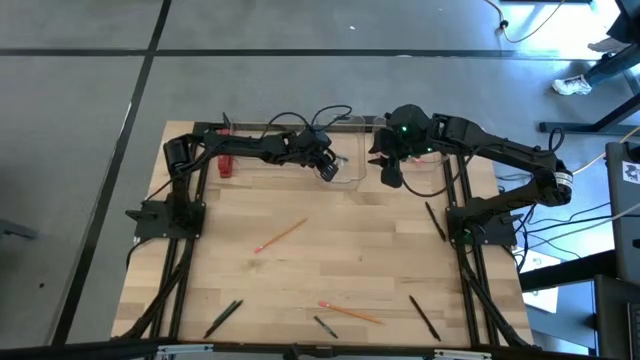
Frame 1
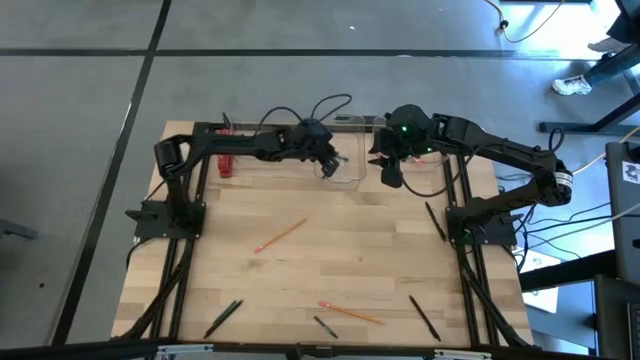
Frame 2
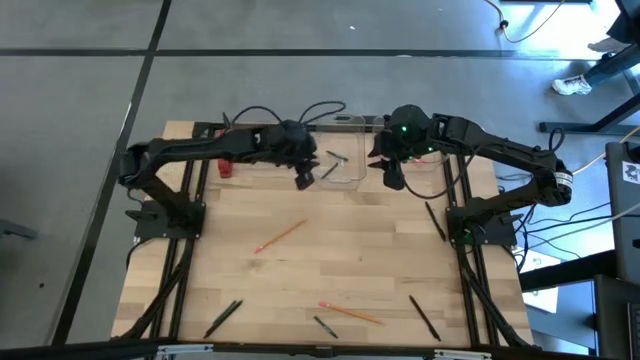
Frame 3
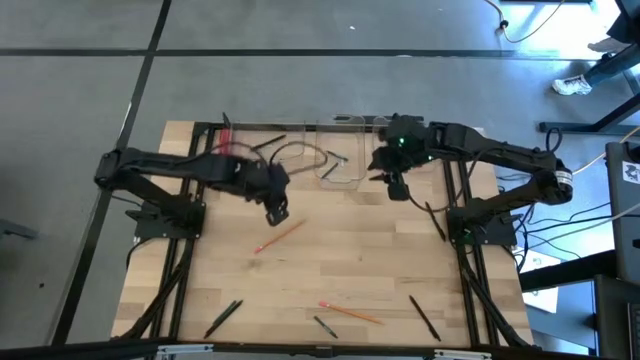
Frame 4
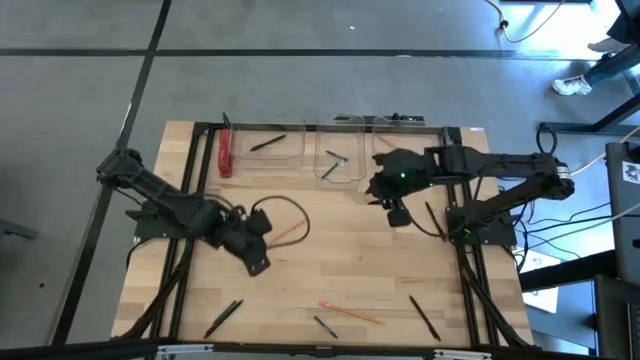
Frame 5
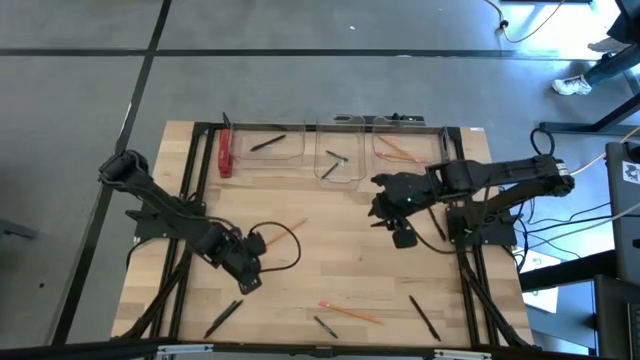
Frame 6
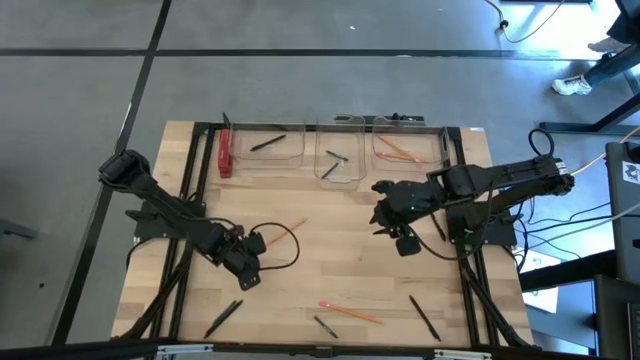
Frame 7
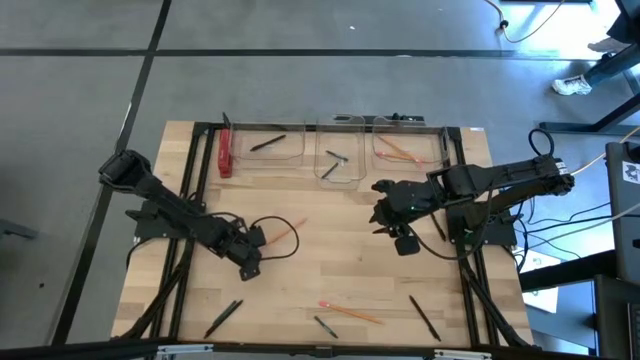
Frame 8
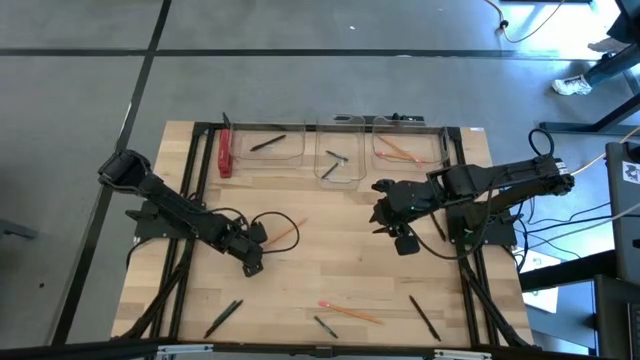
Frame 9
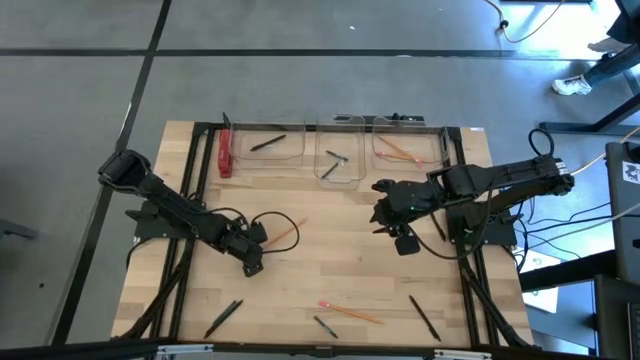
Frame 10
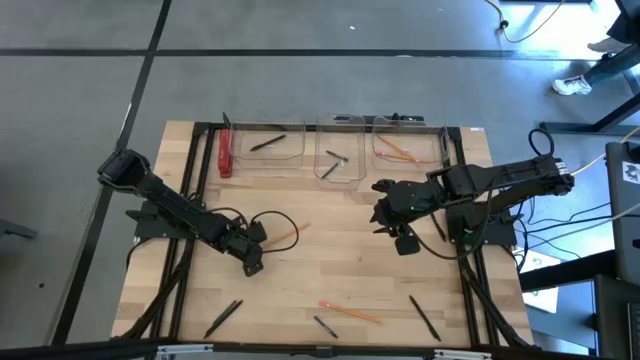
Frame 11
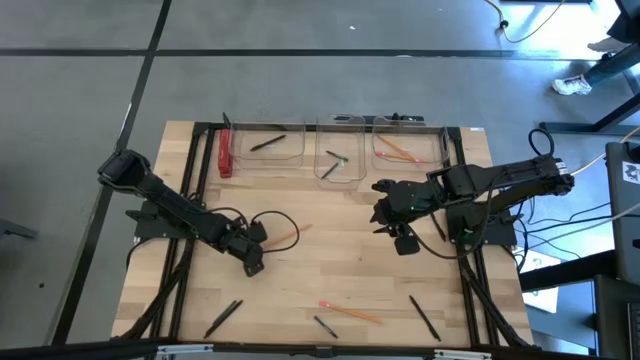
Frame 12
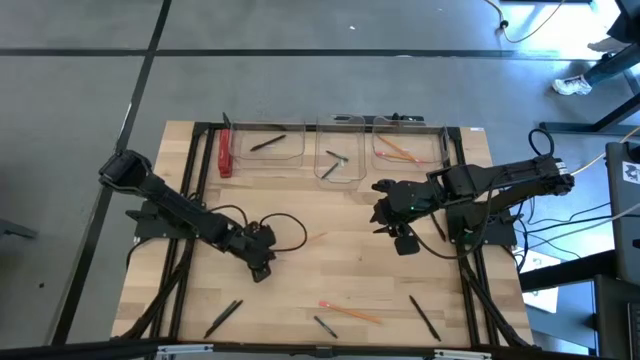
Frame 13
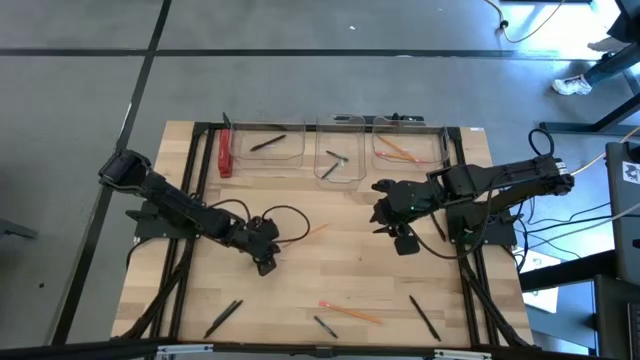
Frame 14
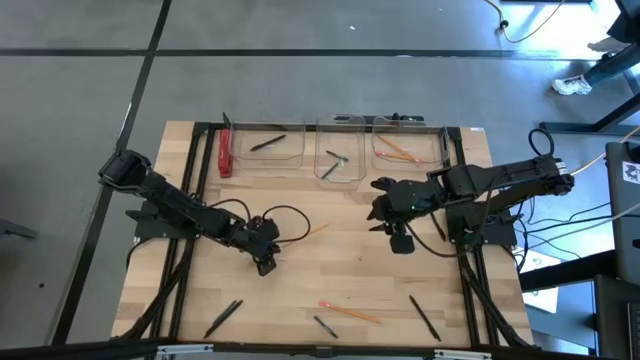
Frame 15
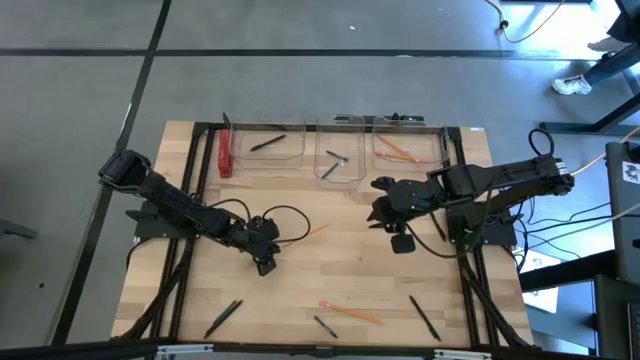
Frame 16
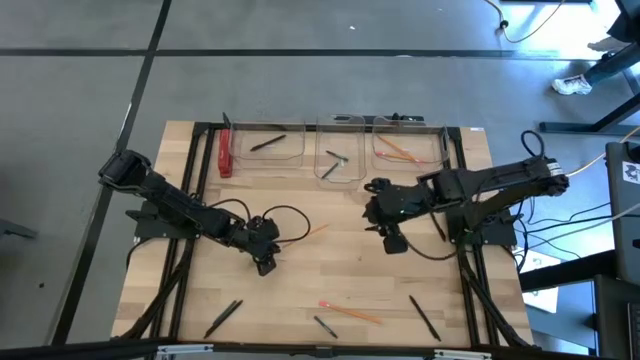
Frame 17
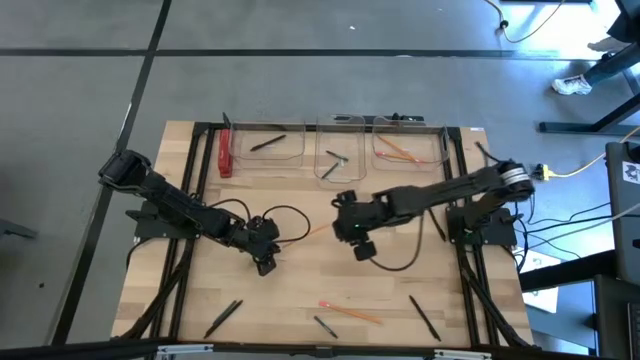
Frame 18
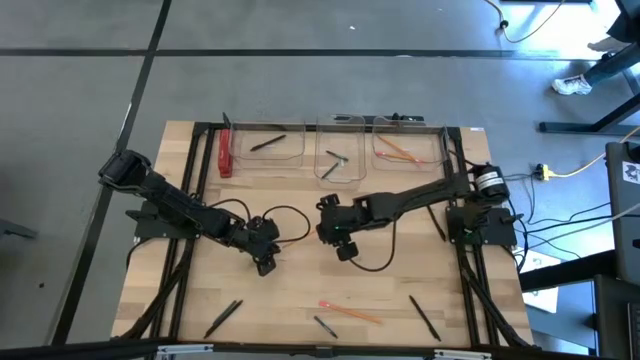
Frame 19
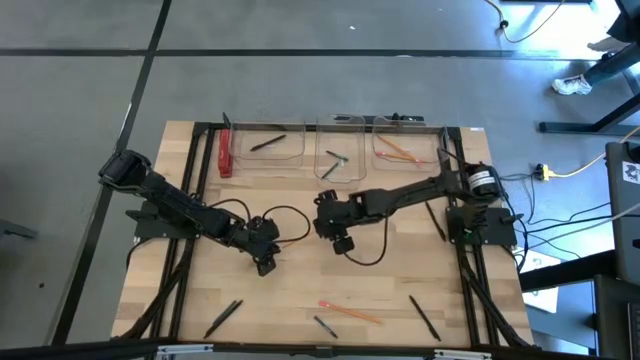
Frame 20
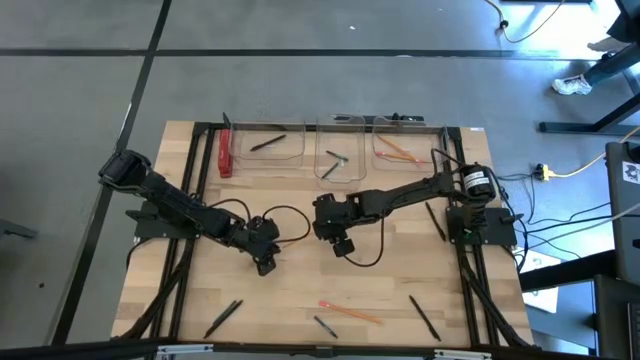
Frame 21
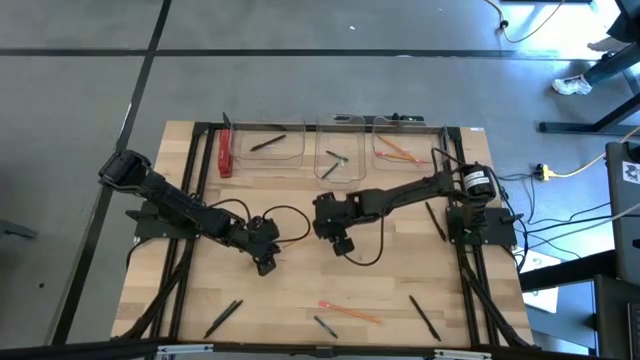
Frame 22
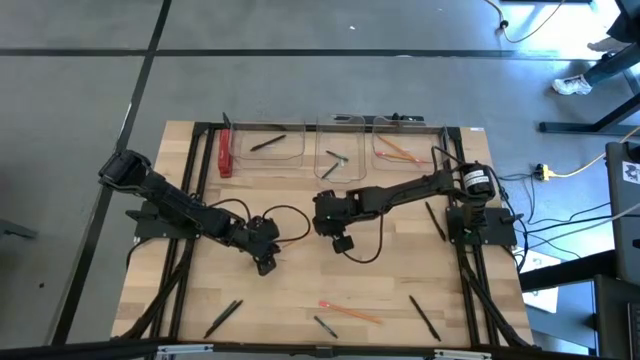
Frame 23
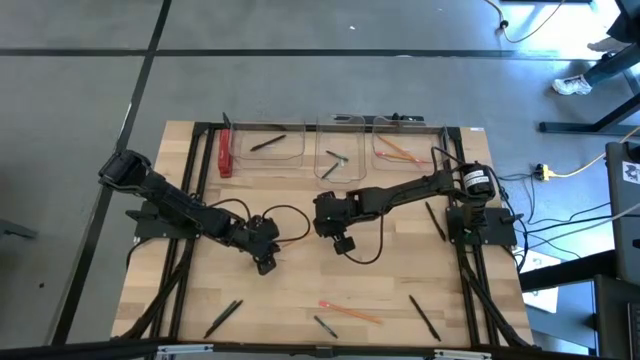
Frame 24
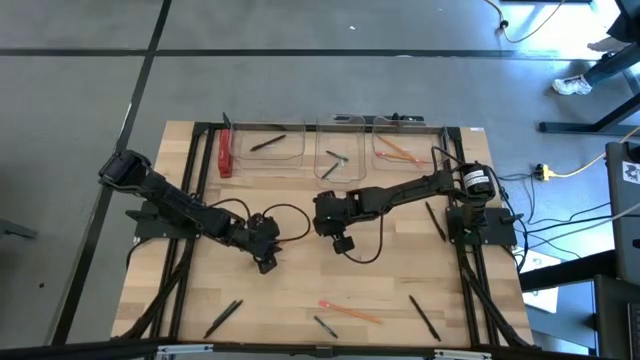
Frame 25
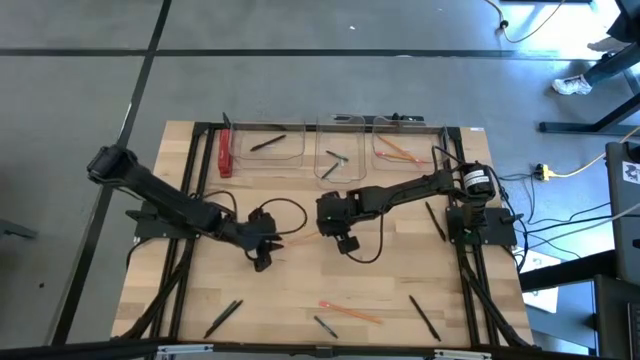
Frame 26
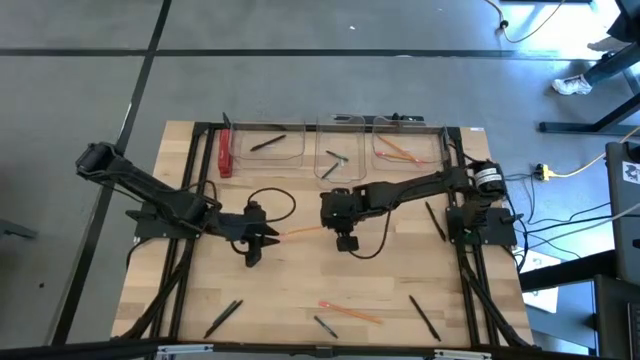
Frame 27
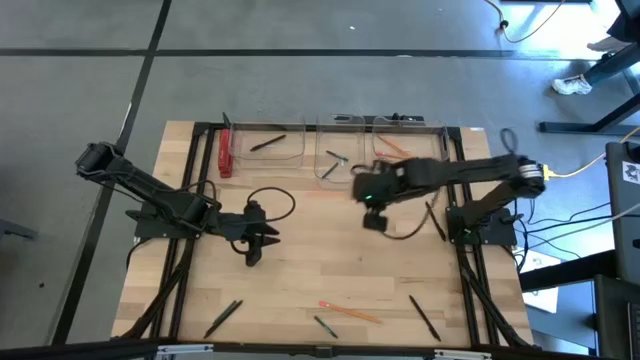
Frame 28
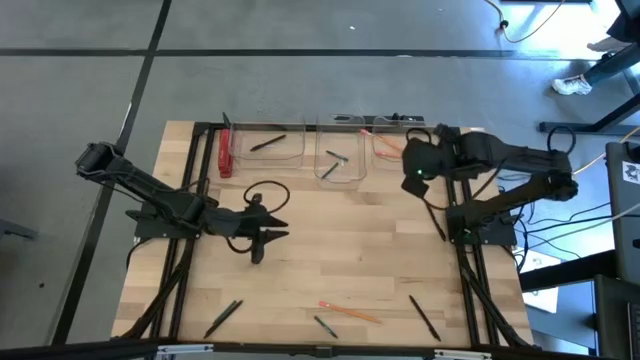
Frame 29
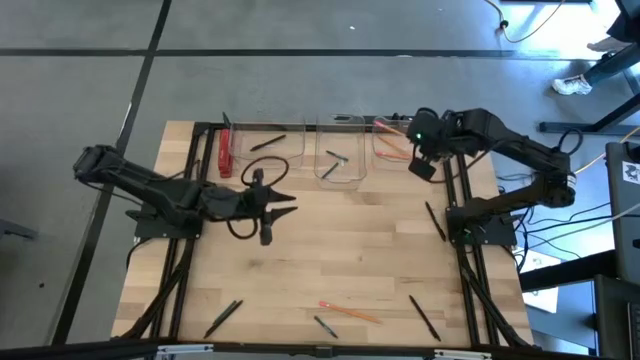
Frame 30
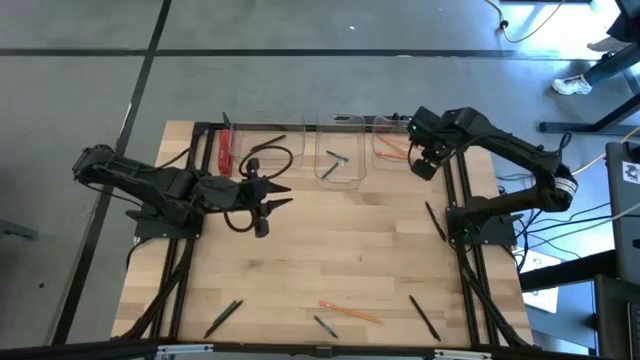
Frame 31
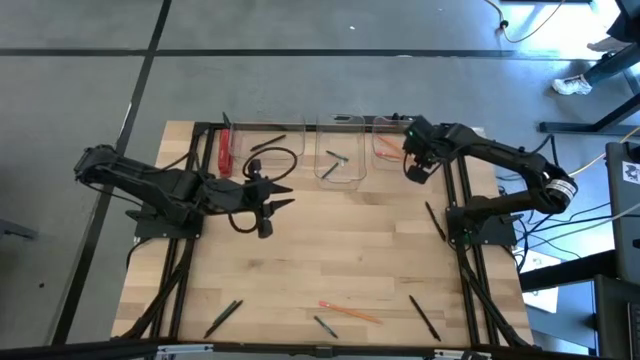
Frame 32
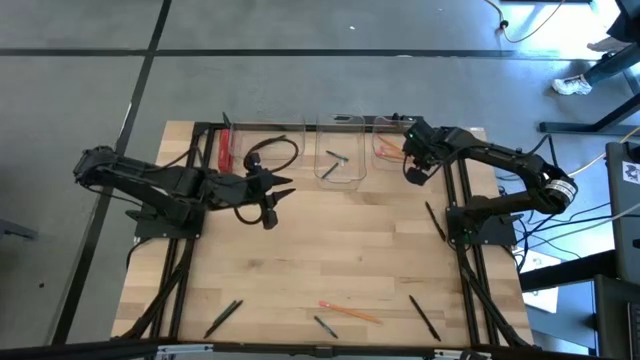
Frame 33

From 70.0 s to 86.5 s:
Task: Sort crayons/erasers/pens/pencils in bins
Put the orange pencil into the right transparent bin

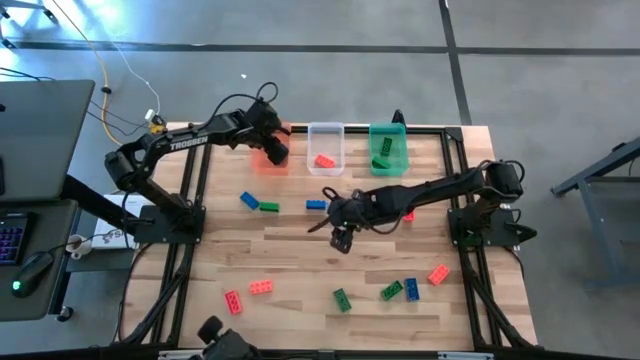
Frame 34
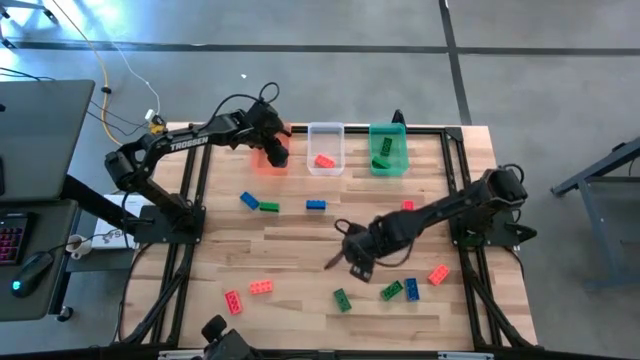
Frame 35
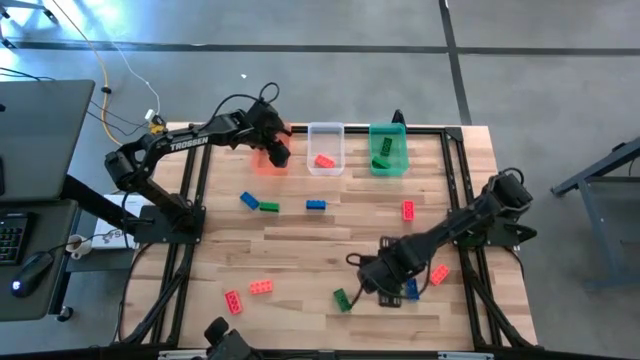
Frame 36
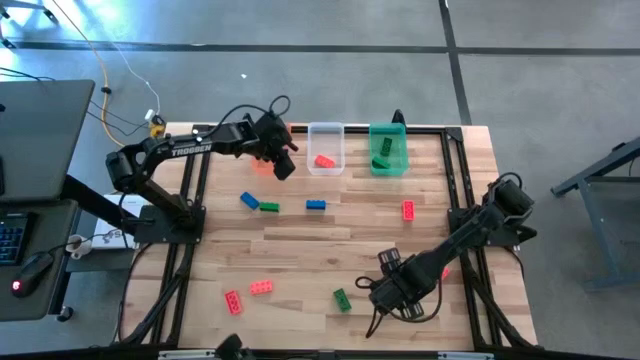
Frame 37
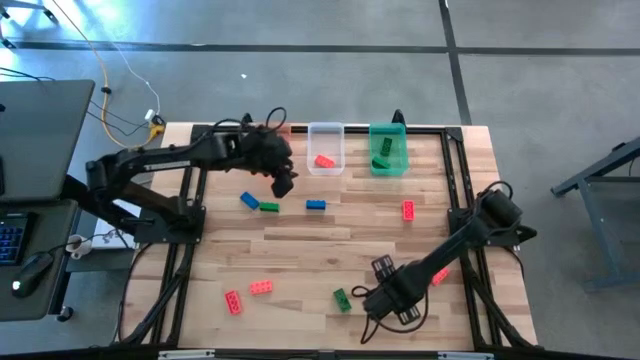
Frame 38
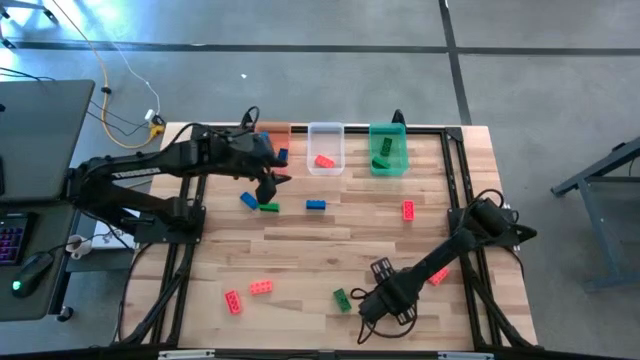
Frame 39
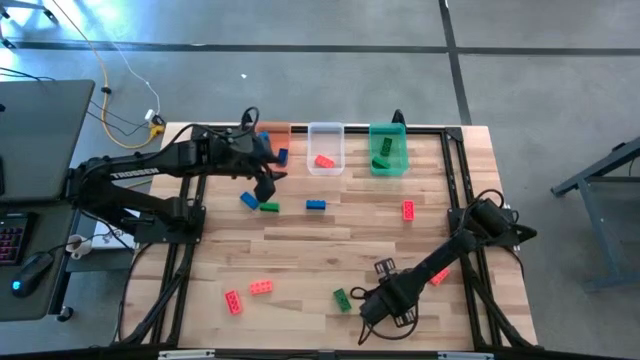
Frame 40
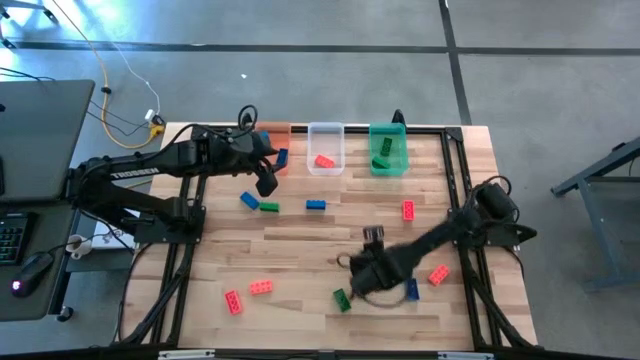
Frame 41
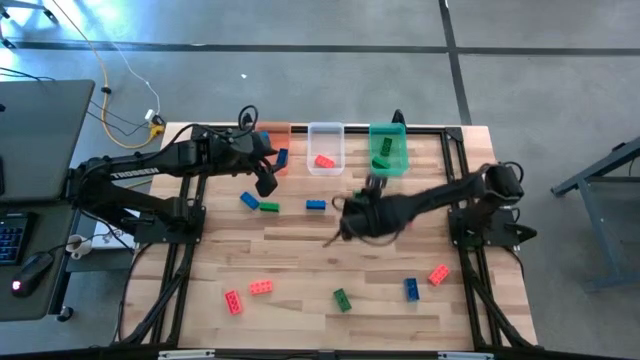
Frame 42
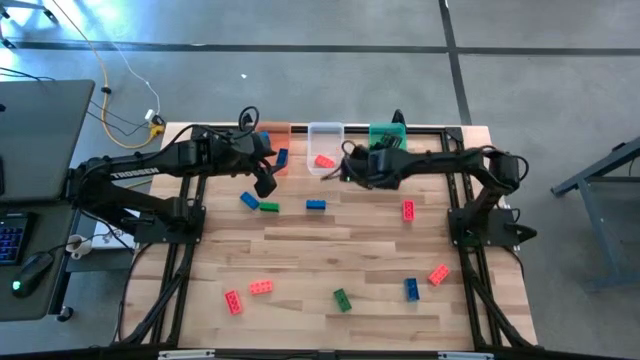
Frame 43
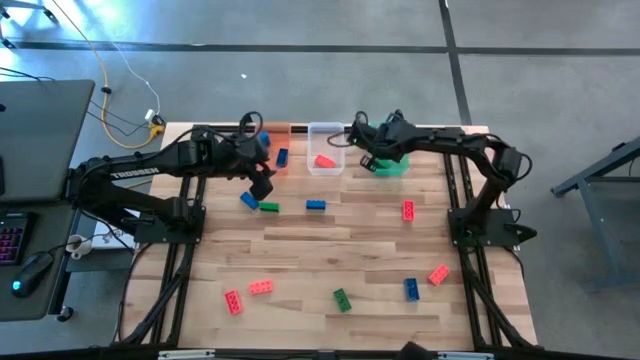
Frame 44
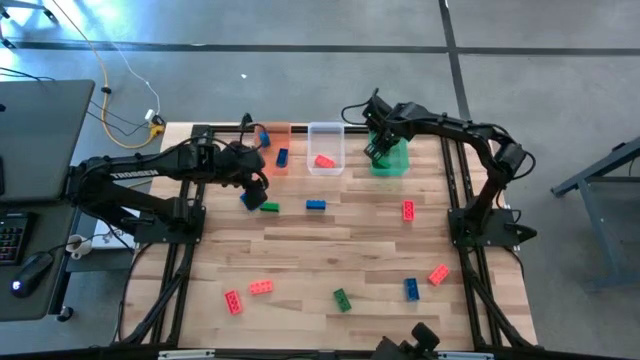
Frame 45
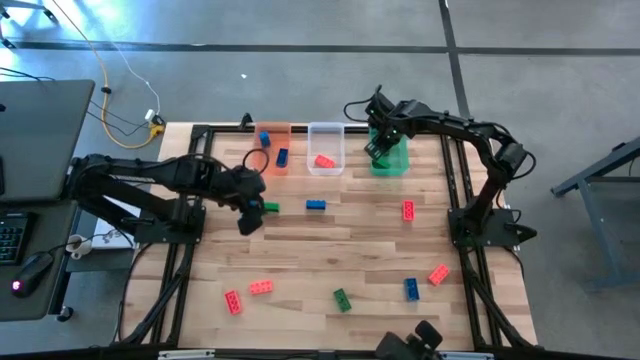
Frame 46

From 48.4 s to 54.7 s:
Task: Sort & place blocks by color
Put the green game piece into the green bin
